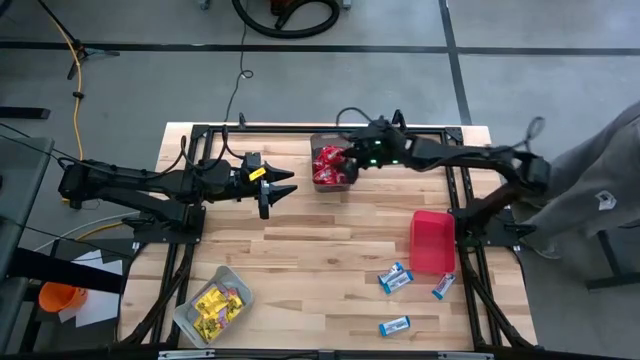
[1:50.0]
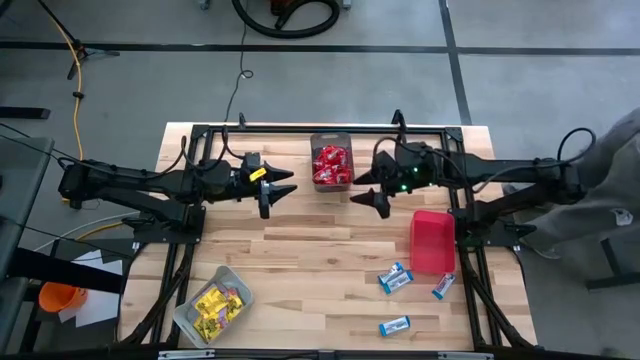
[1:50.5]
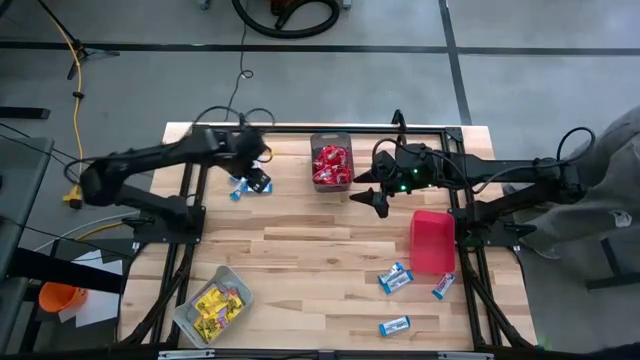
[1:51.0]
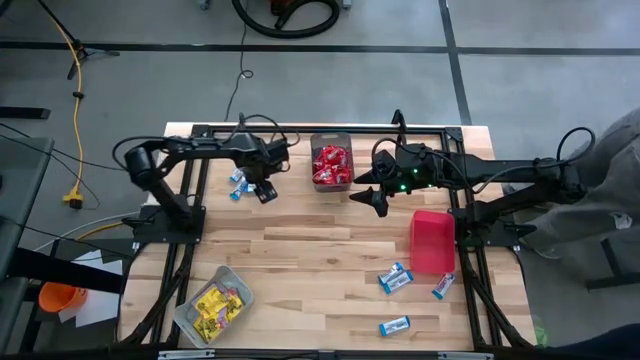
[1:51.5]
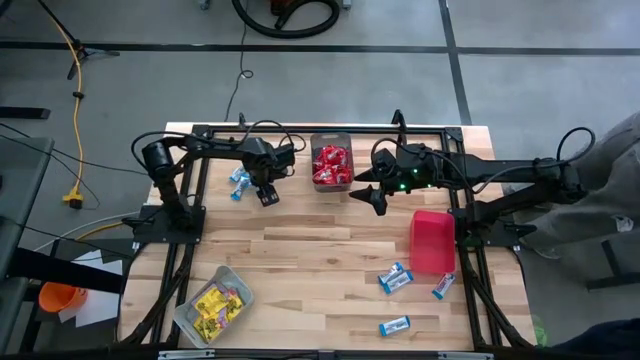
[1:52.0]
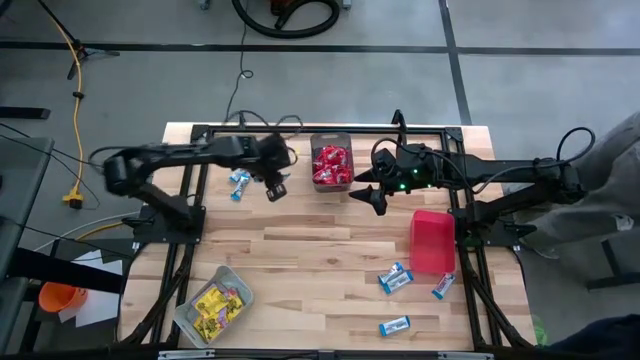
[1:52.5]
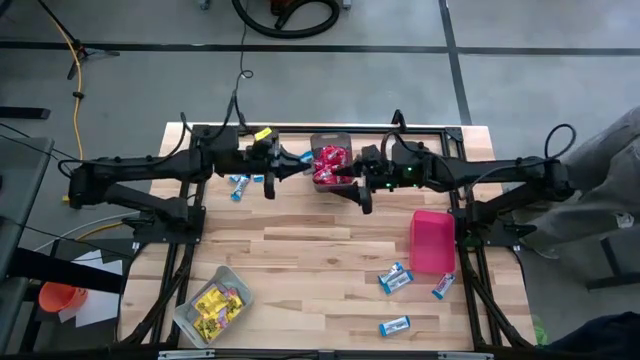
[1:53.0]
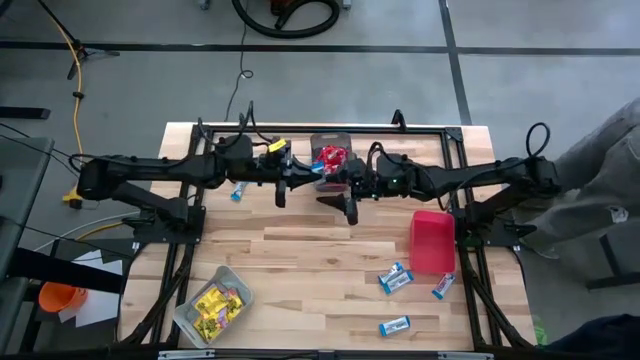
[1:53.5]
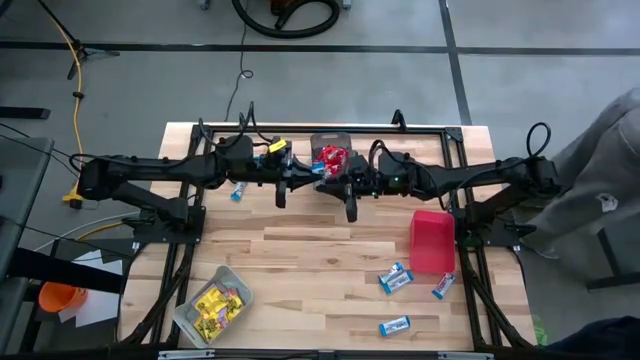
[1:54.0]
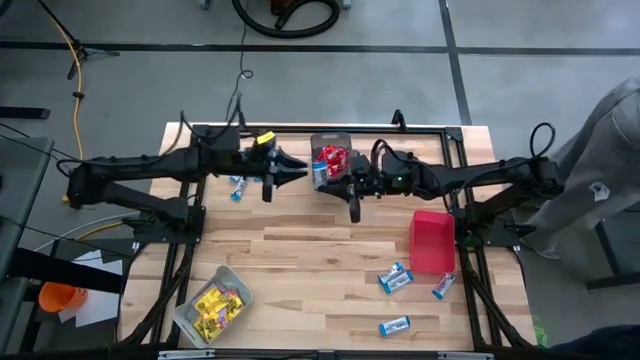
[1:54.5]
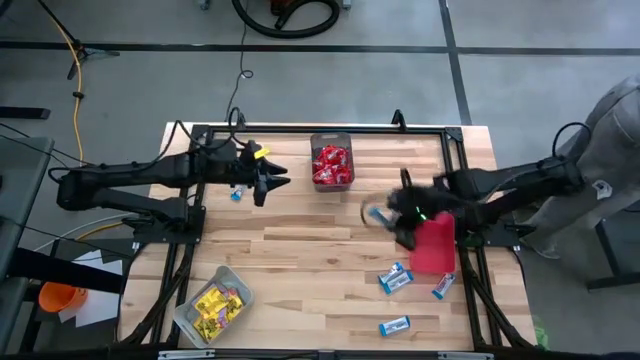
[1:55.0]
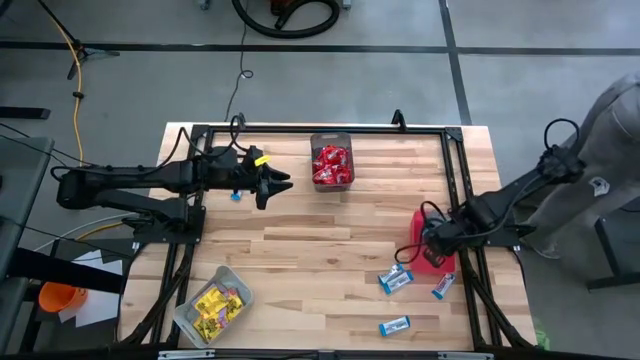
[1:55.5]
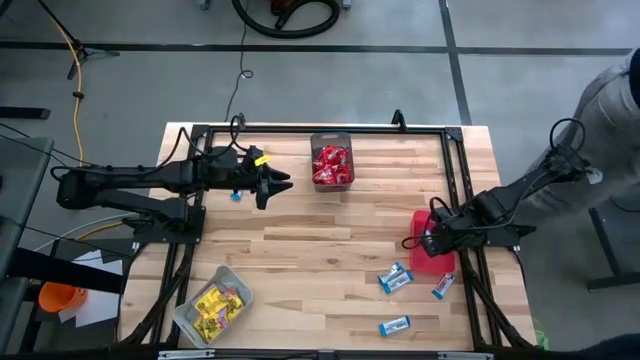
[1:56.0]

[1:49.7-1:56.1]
Task: Sort candy
Put the white chocolate candy into the red bin

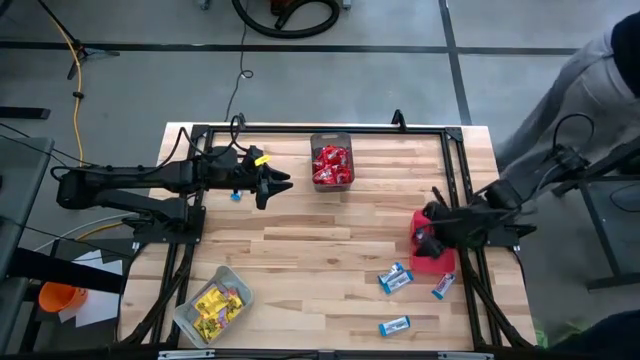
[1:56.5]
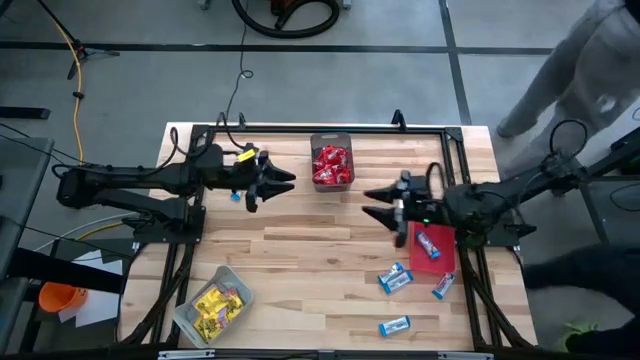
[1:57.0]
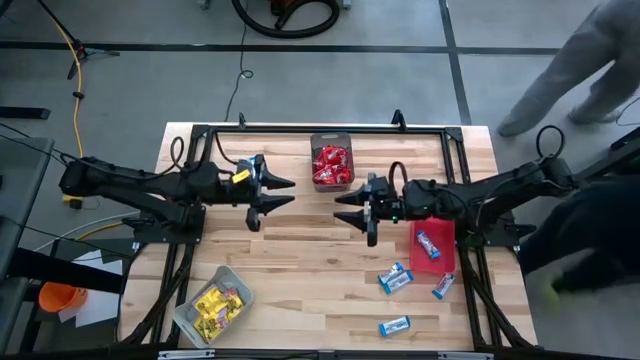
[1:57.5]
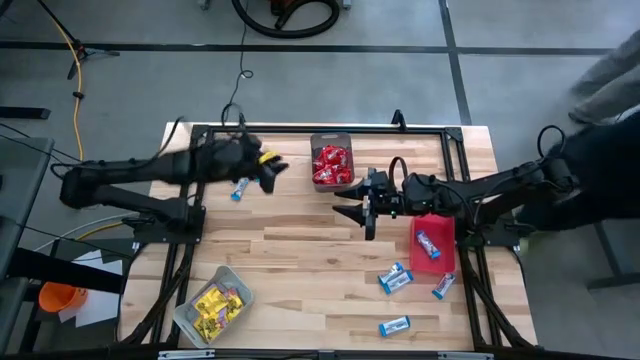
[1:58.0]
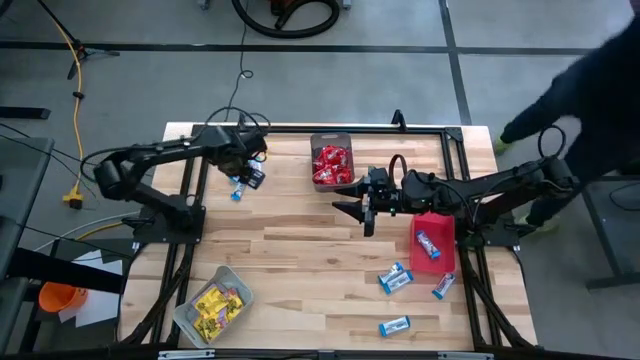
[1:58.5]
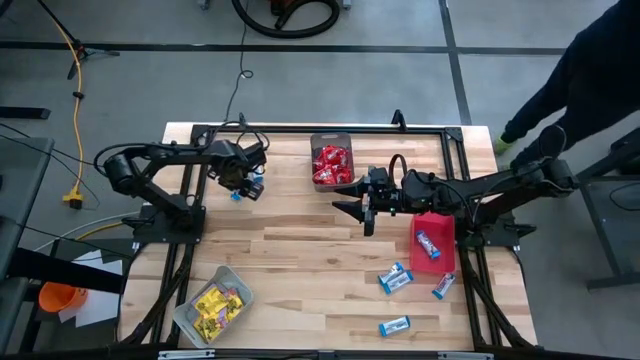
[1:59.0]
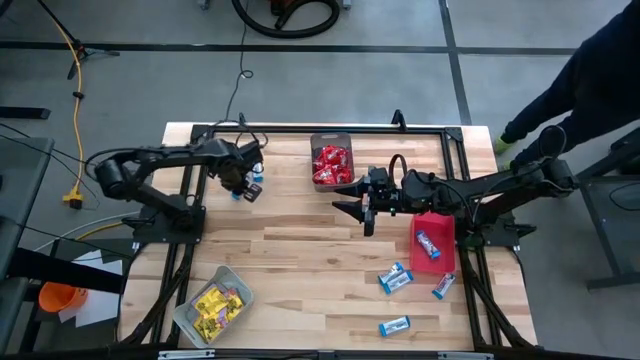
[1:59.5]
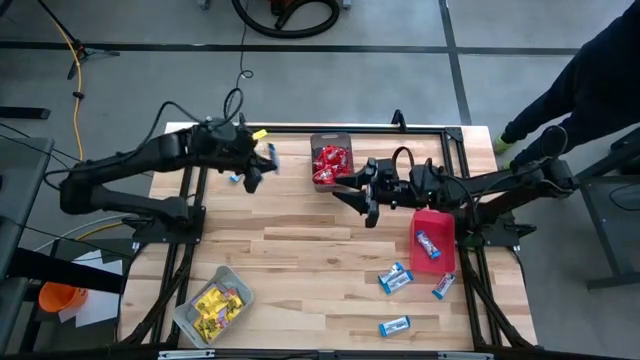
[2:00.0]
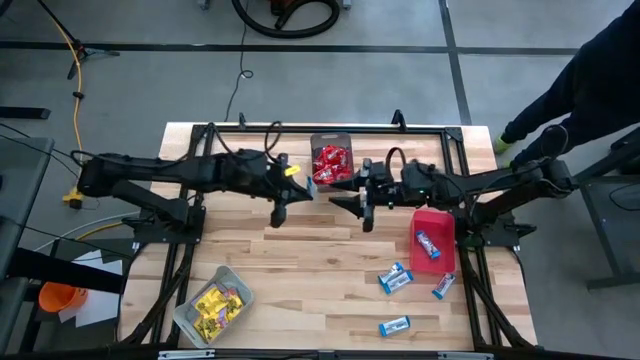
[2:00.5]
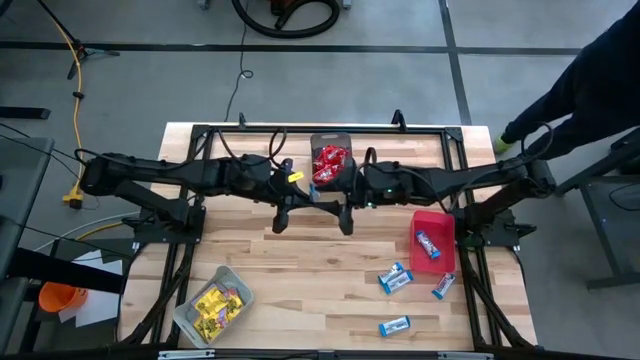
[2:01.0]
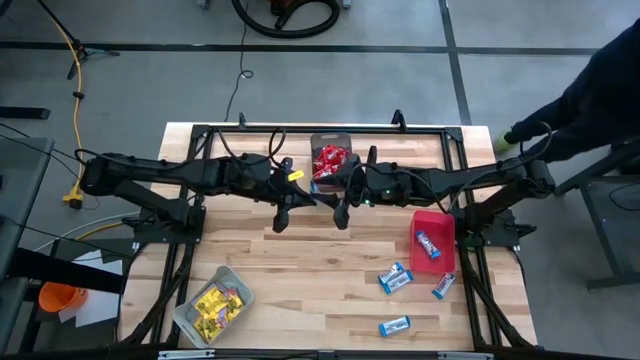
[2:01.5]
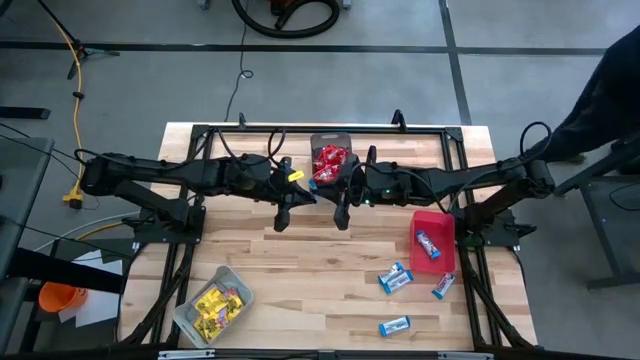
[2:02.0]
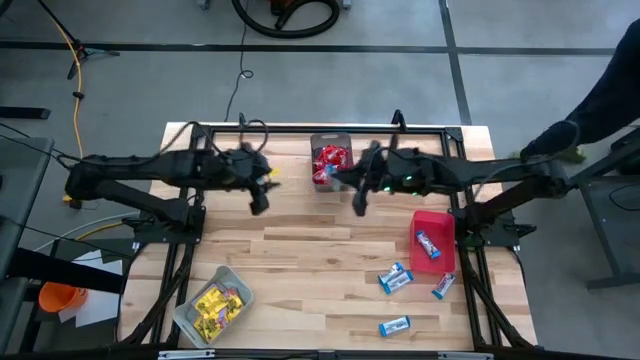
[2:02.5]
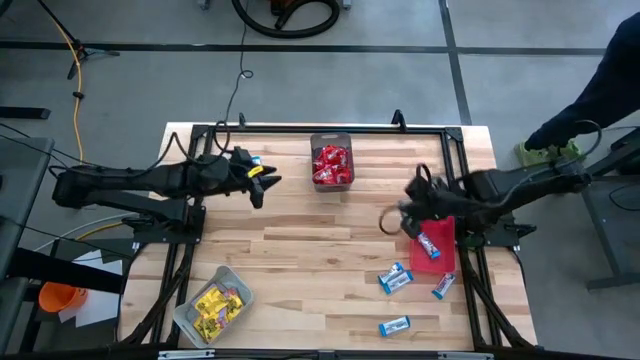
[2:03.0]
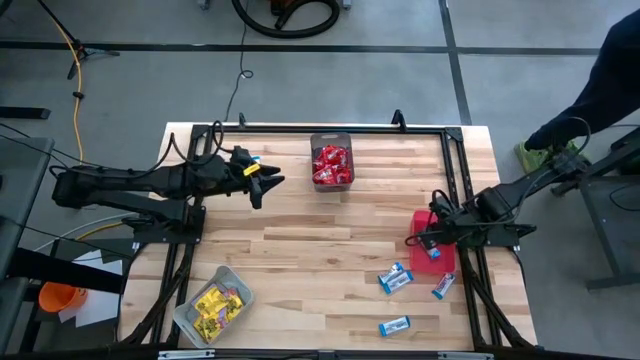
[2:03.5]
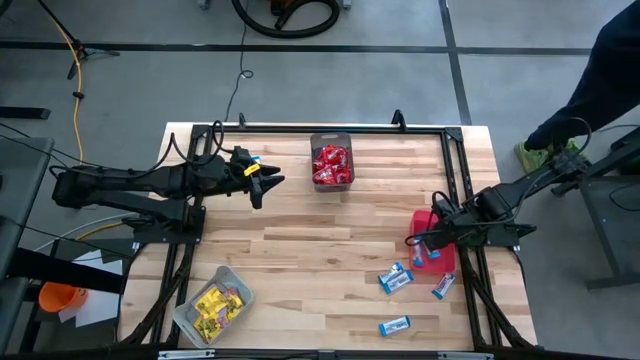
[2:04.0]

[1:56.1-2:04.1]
Put the white chocolate candy into the red bin

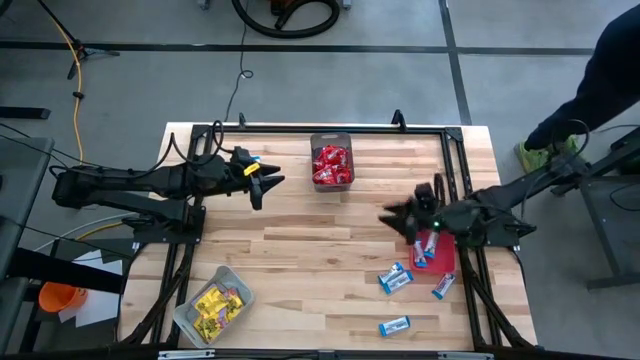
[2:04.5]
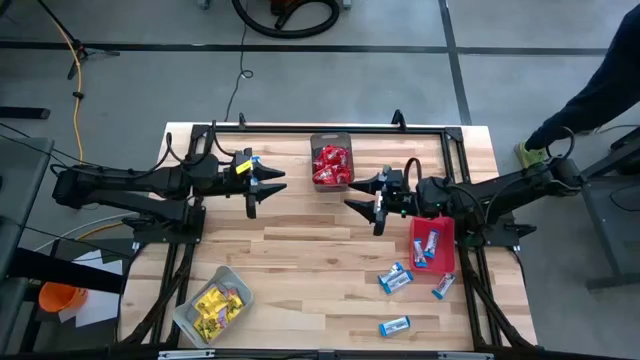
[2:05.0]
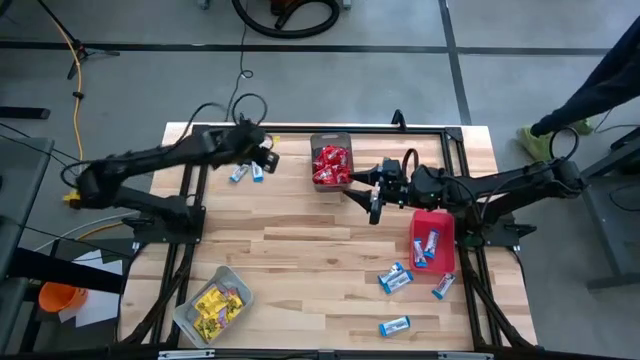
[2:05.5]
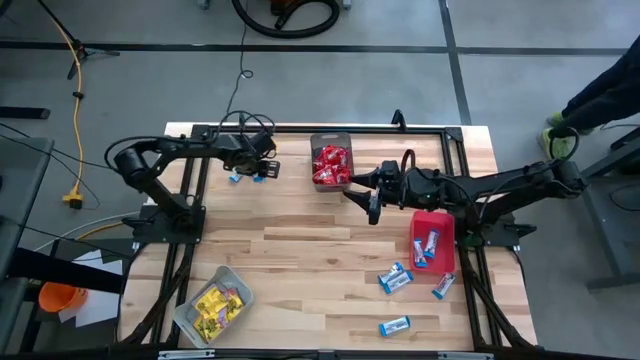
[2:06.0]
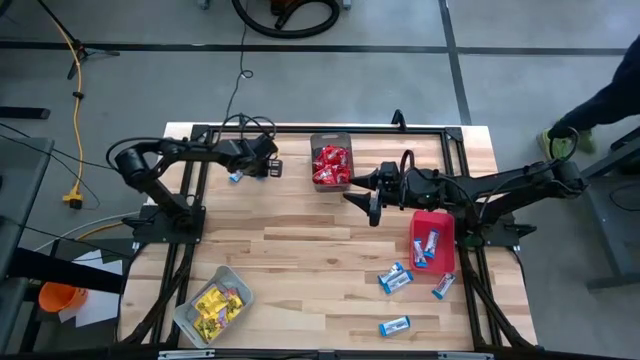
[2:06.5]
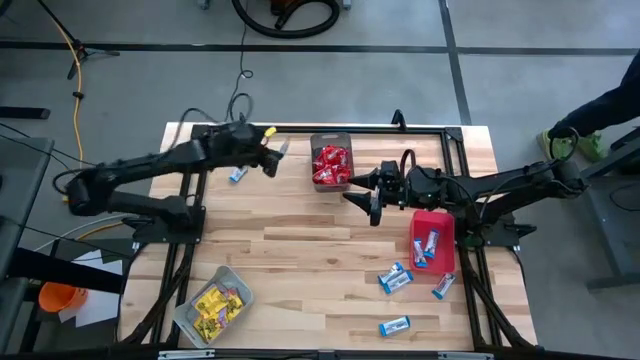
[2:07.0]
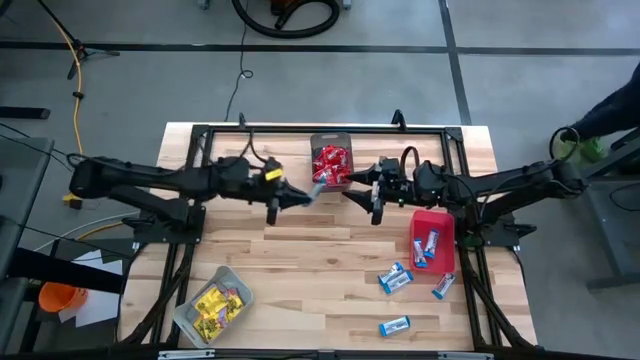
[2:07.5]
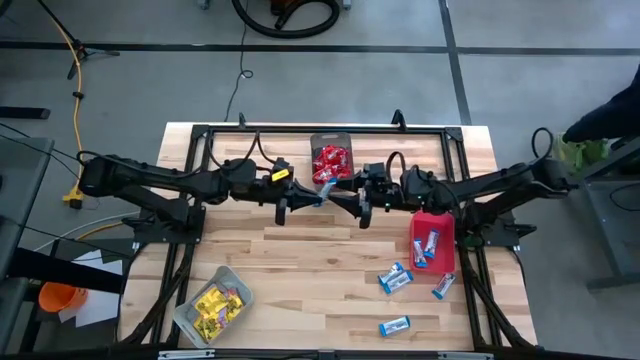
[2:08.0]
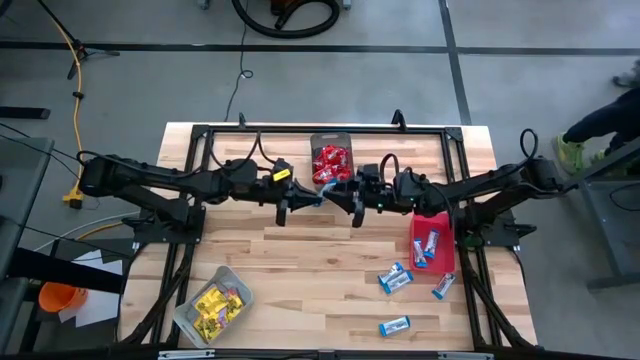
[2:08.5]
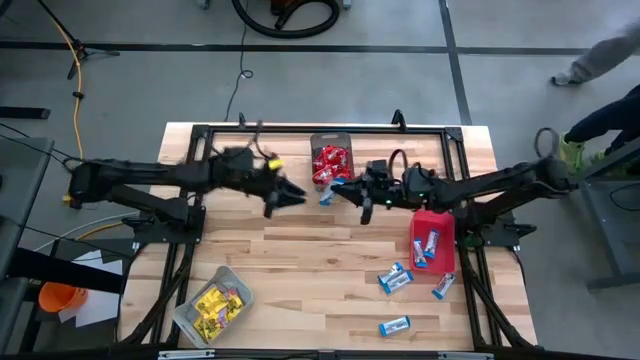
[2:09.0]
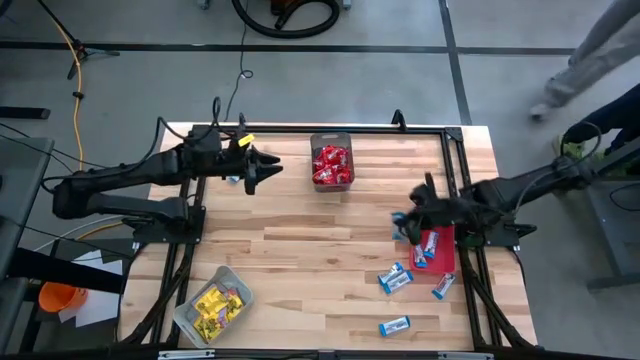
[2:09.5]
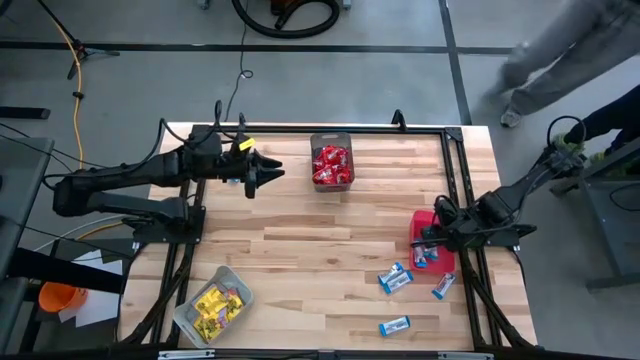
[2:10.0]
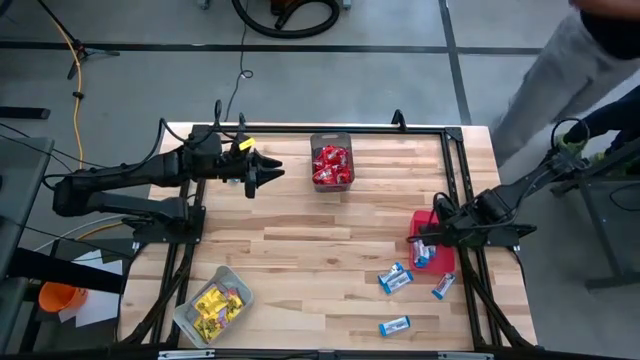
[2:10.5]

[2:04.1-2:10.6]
Put the white chocolate candy into the red bin
